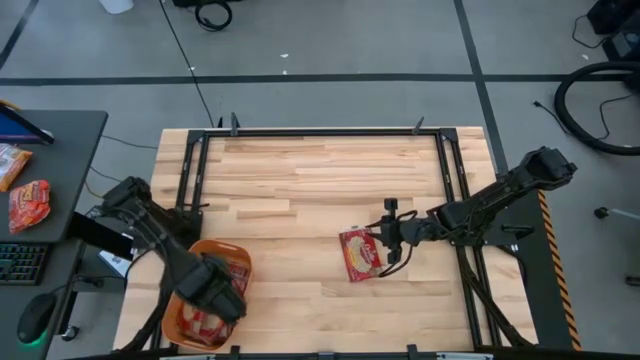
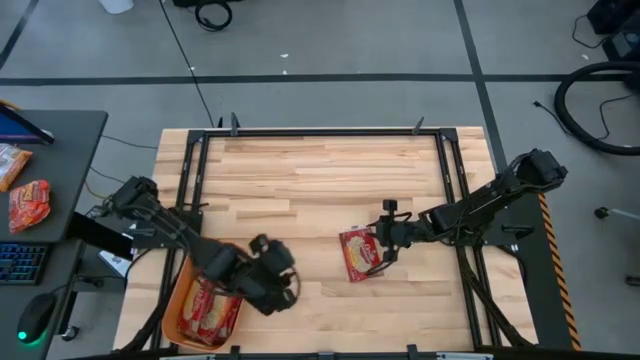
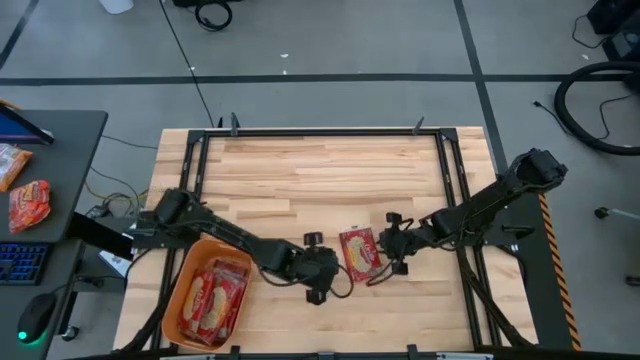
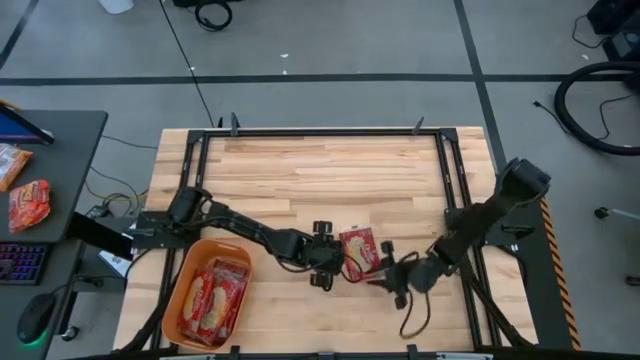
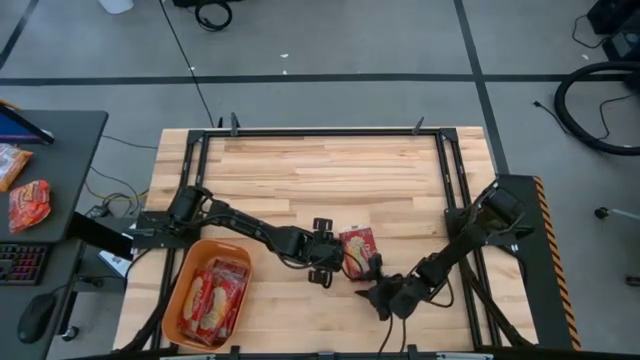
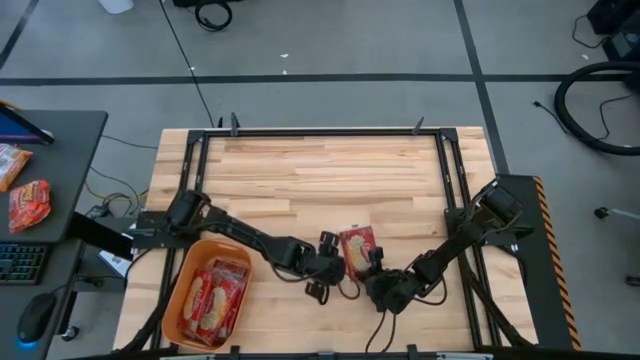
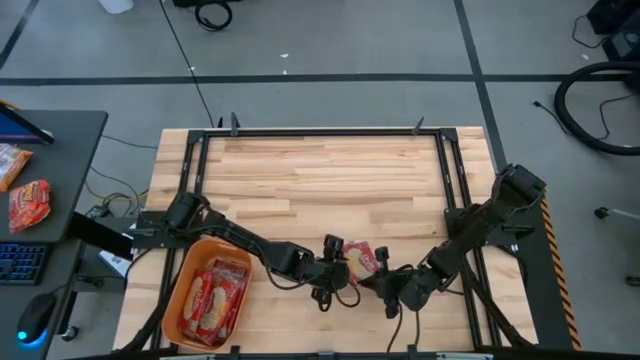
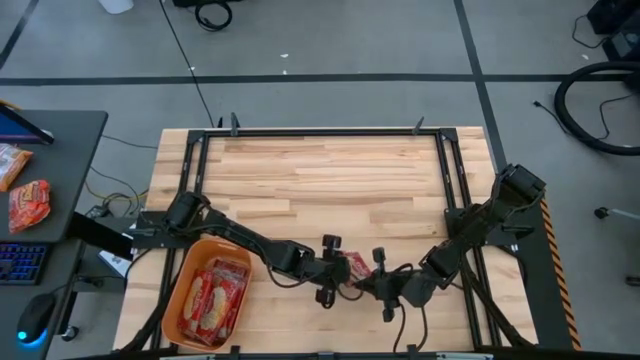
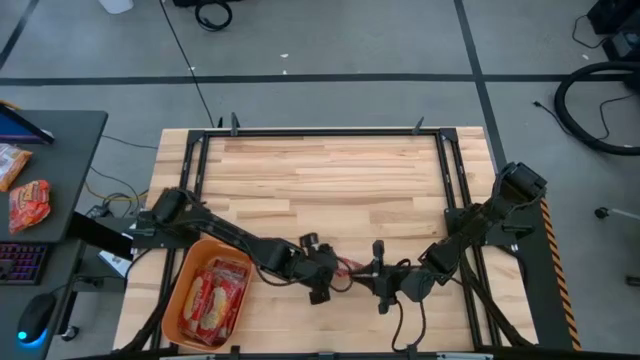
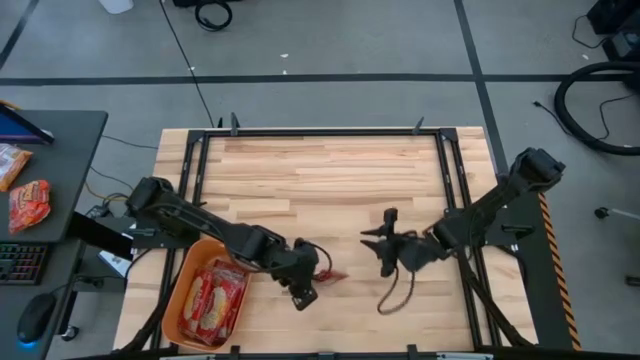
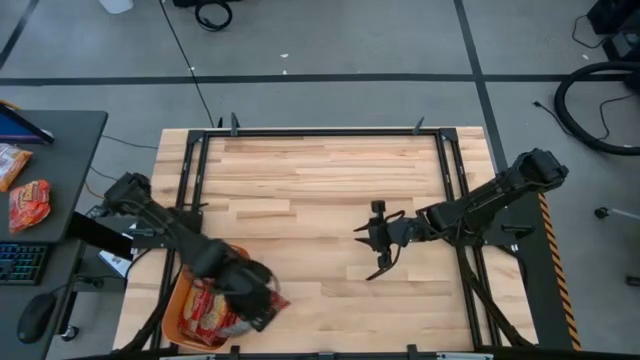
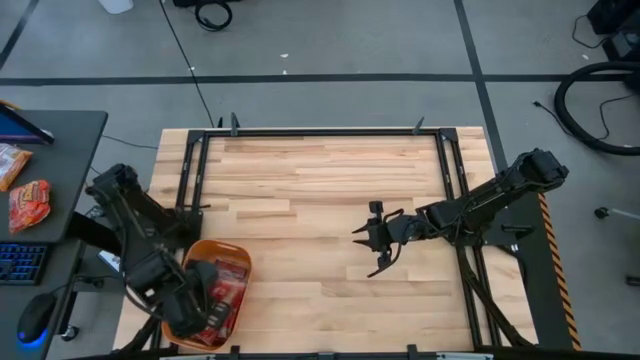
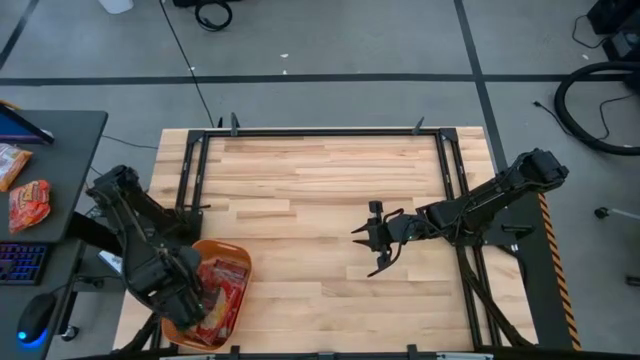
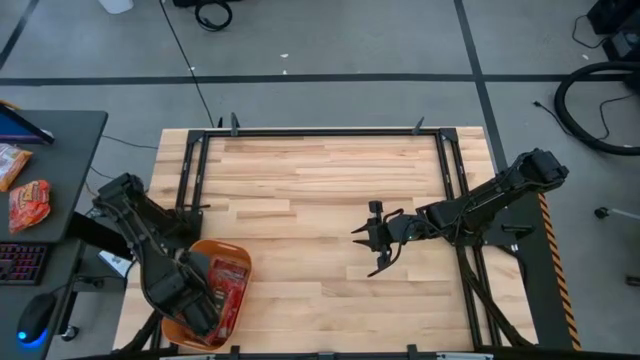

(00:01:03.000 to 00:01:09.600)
Task: Sort popcorn bags into baskets
Put the popcorn bag into the orange bin

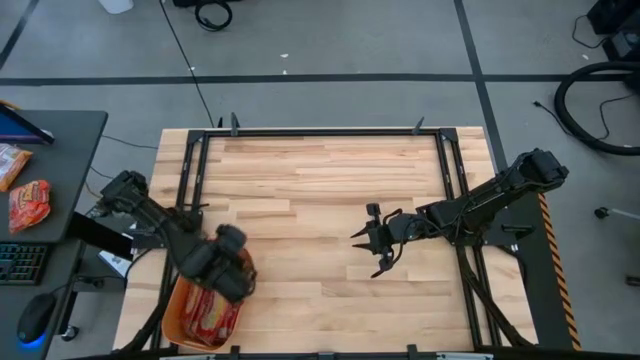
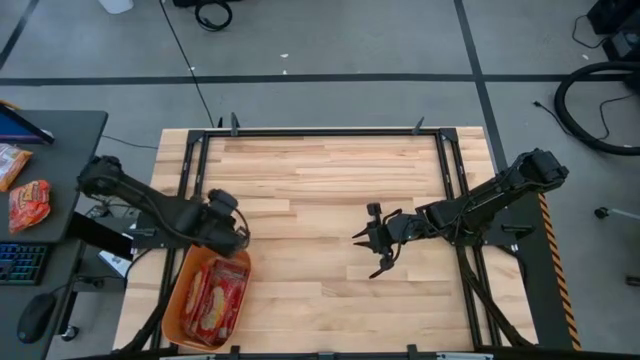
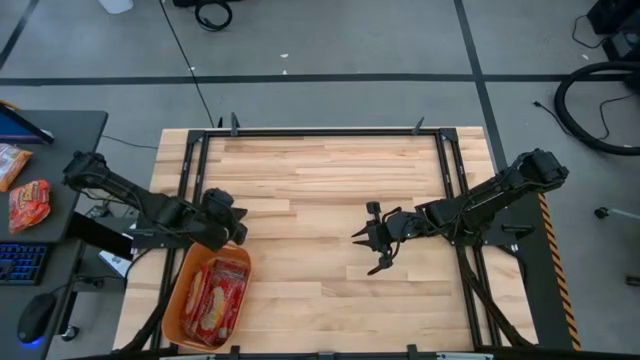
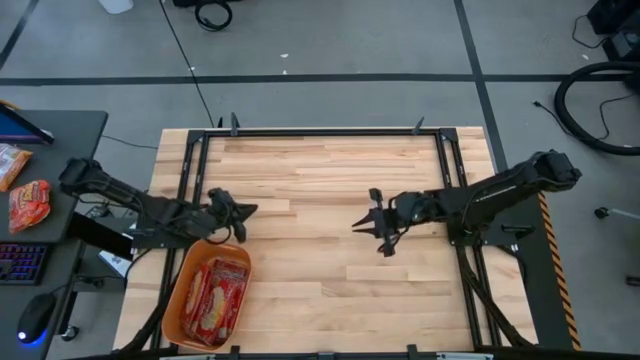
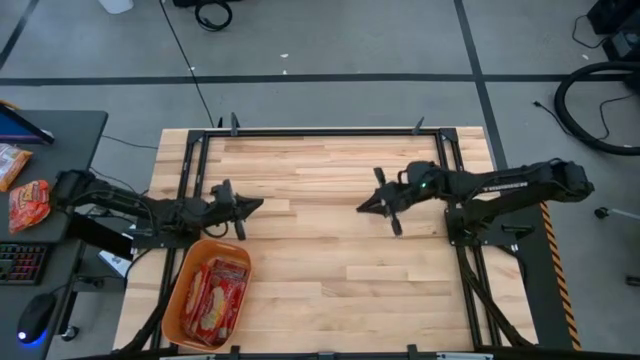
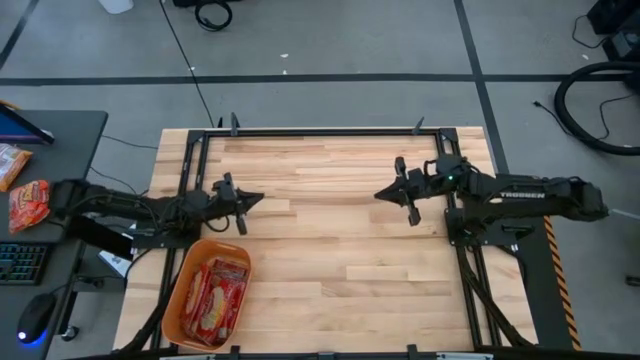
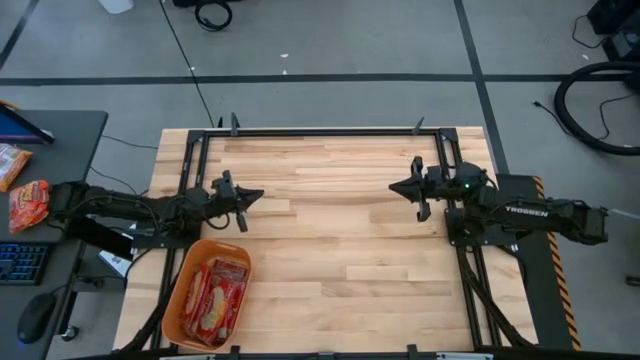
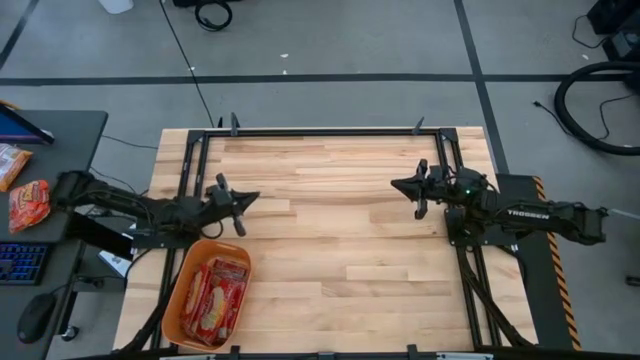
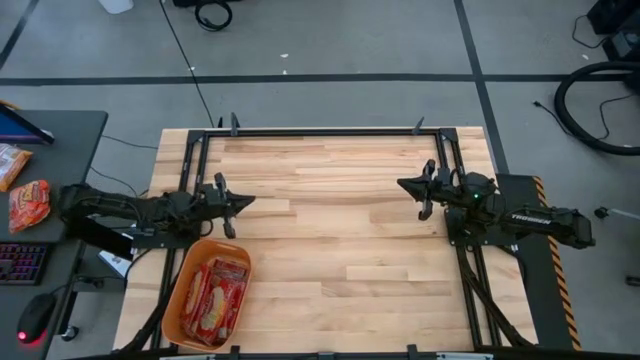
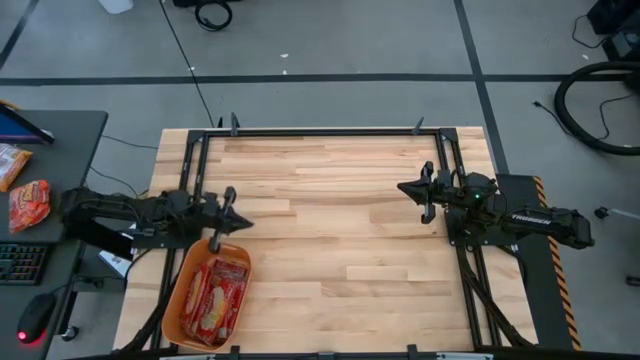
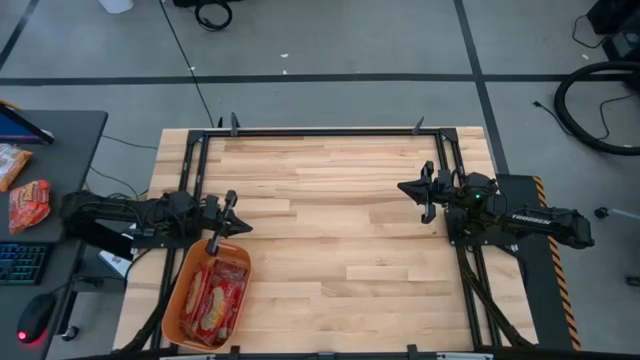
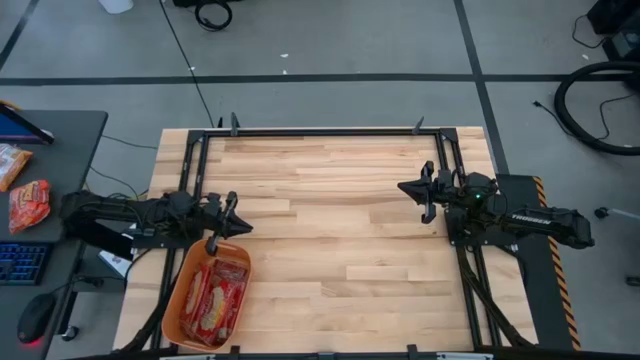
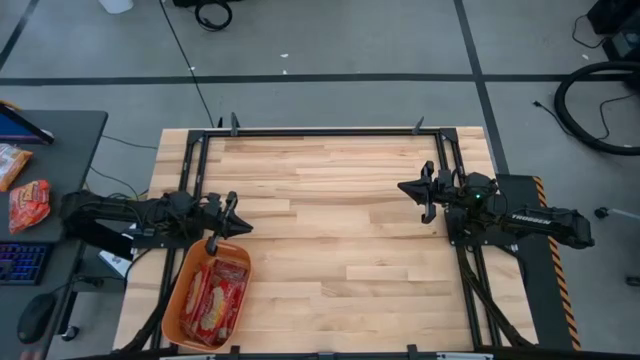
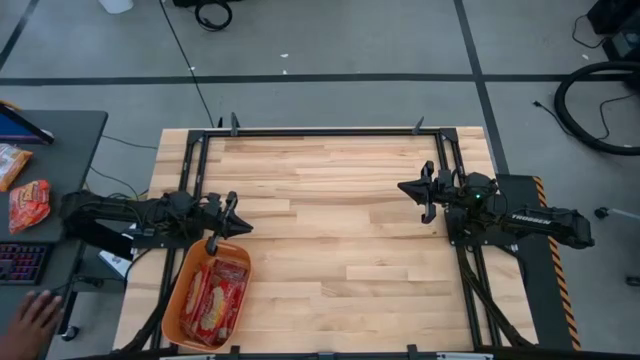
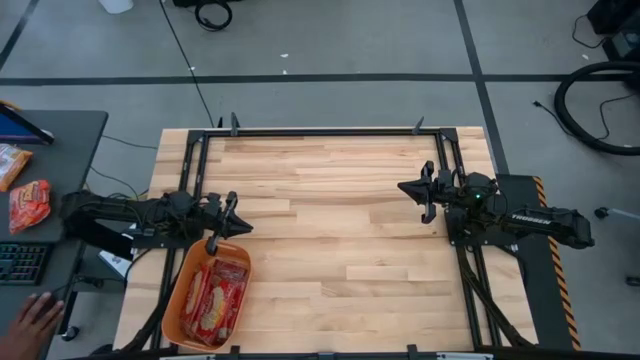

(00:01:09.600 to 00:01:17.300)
Return to Home Position

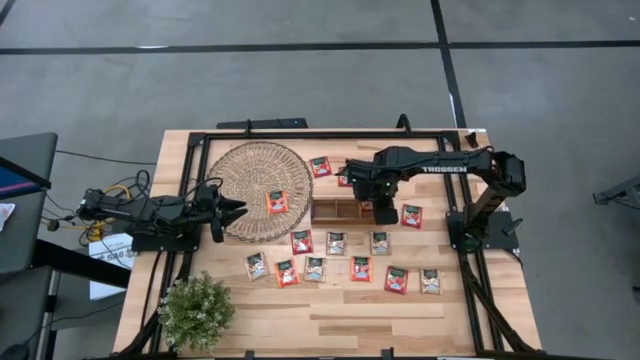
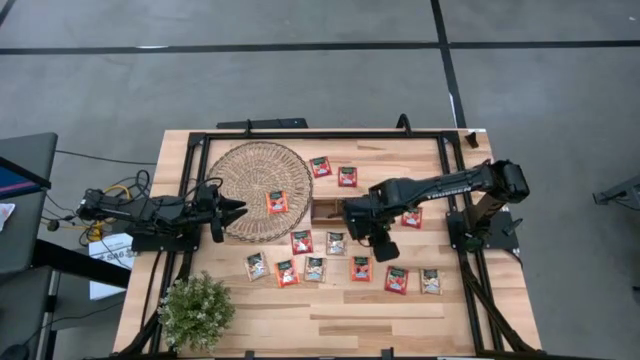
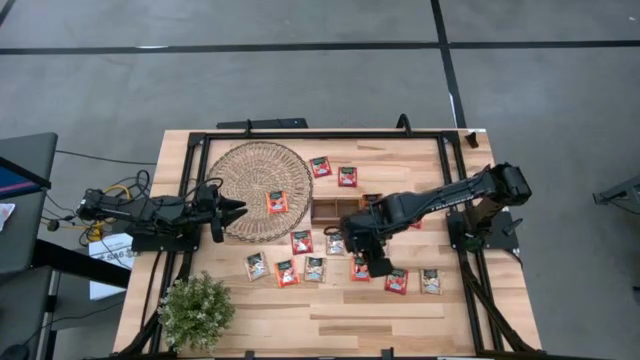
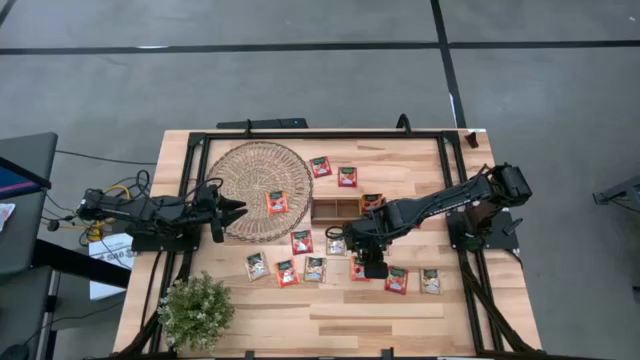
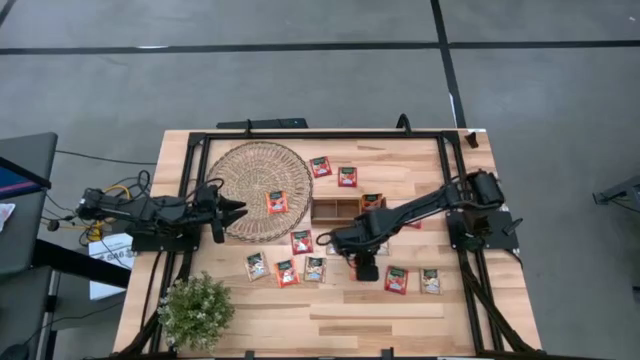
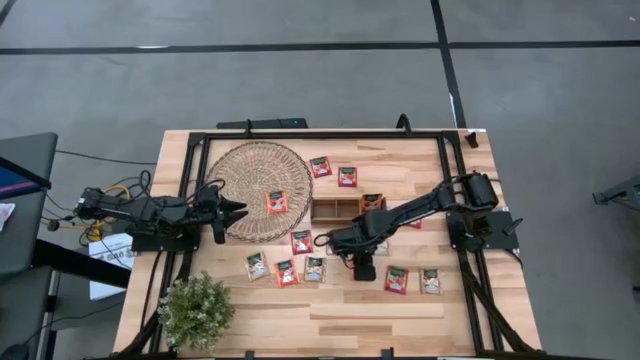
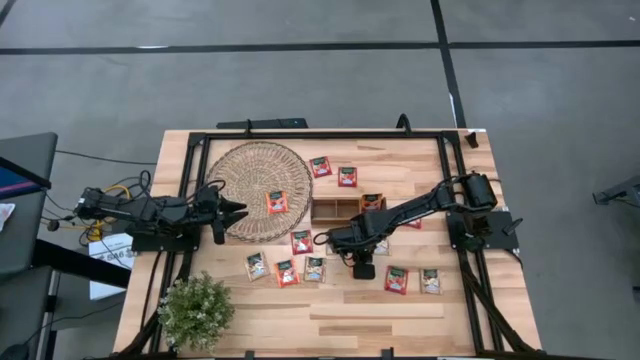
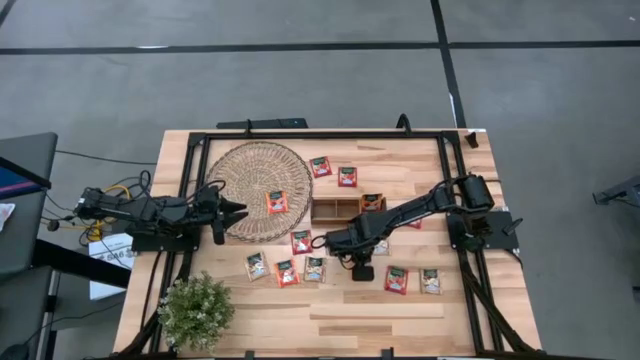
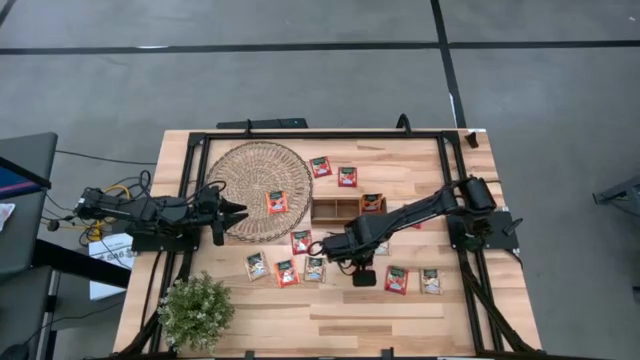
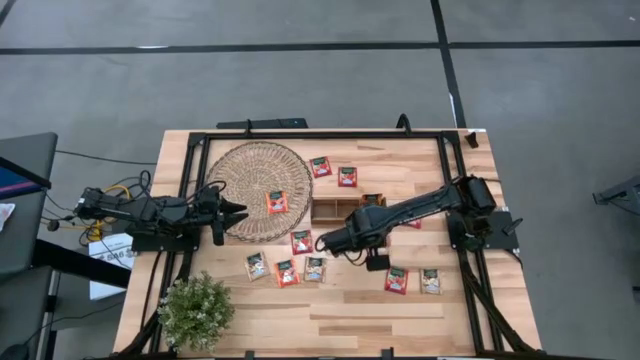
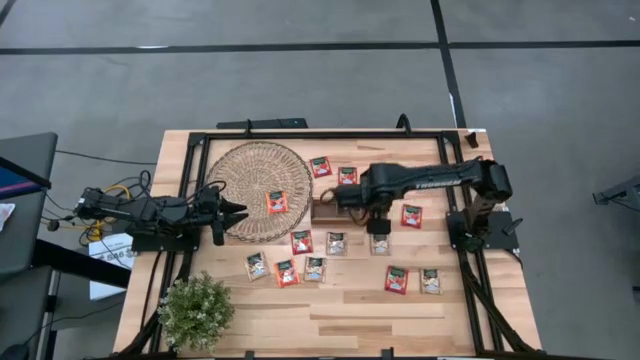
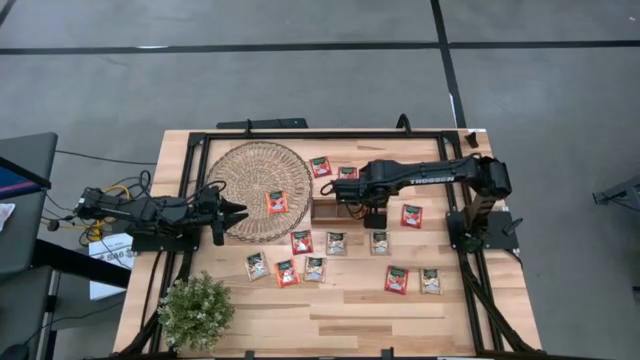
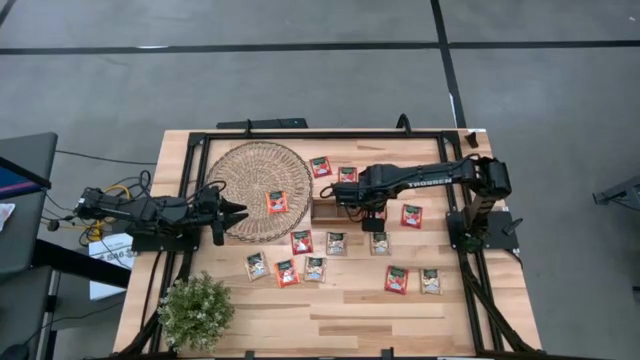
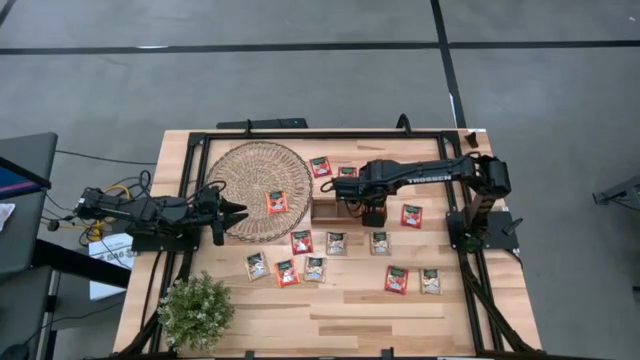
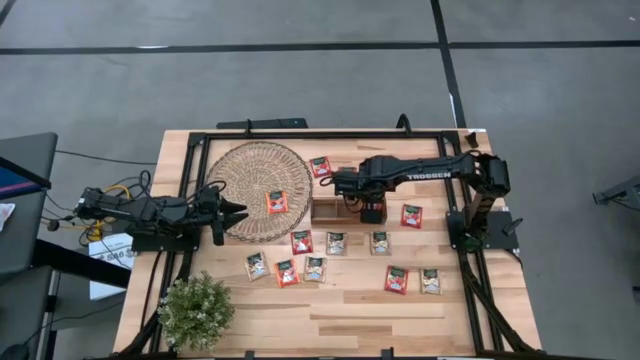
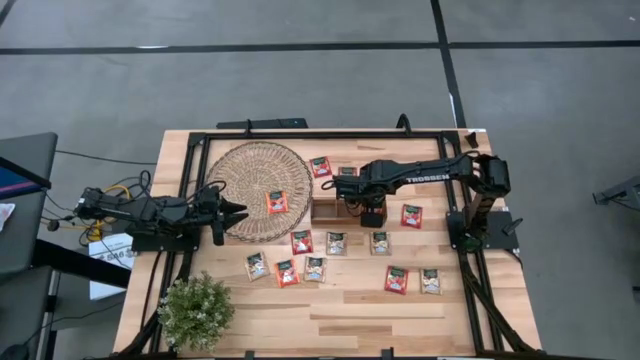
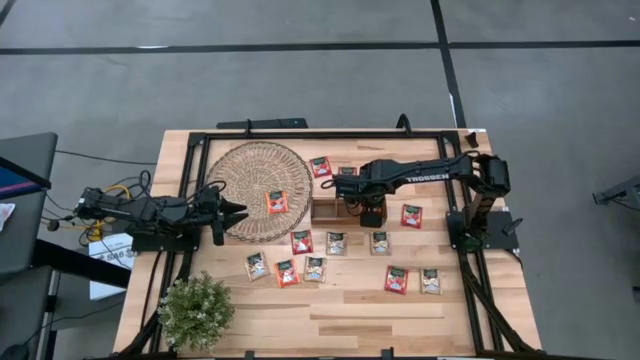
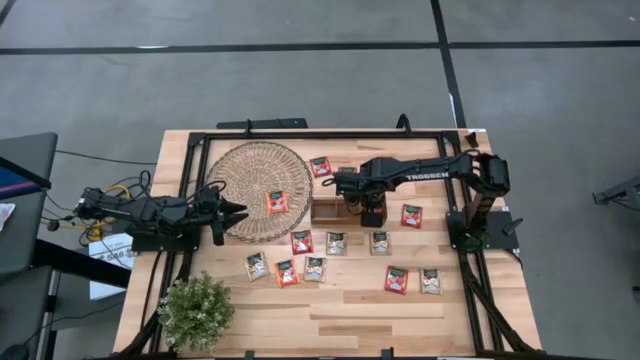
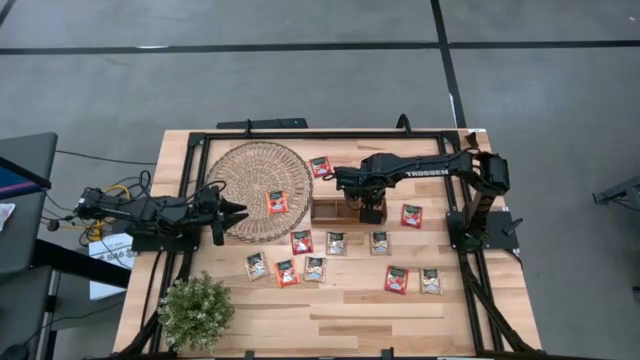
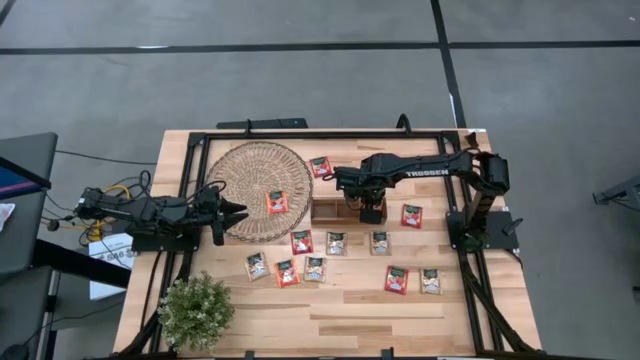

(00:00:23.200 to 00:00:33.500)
Task: Pick & Place Tea
Put the orange tea bag into the right section of the wooden organizer
